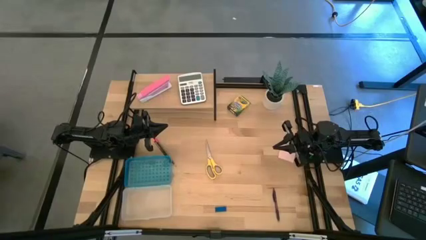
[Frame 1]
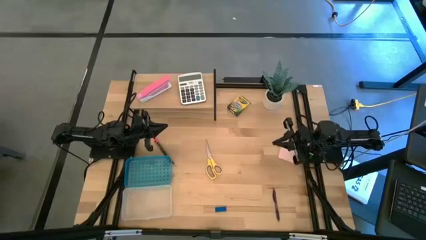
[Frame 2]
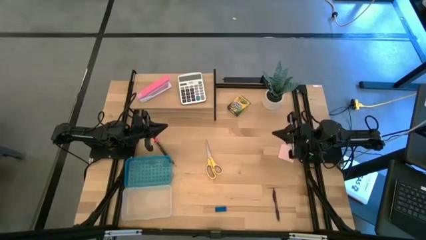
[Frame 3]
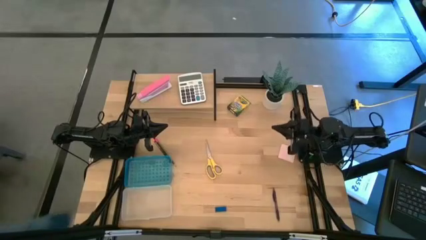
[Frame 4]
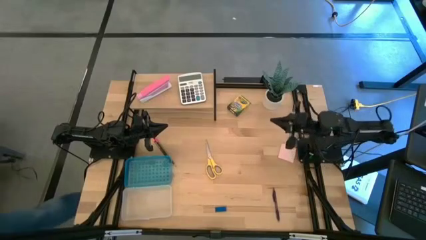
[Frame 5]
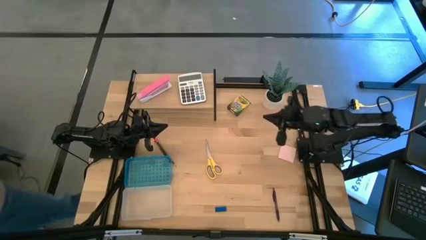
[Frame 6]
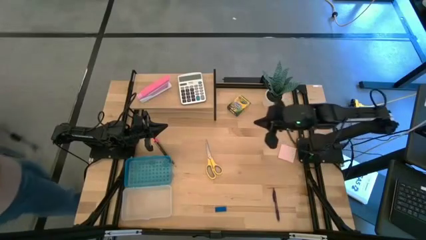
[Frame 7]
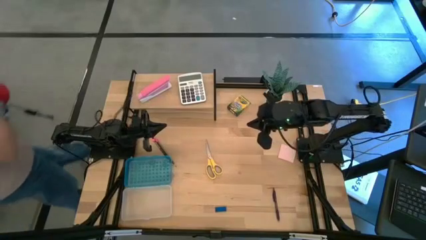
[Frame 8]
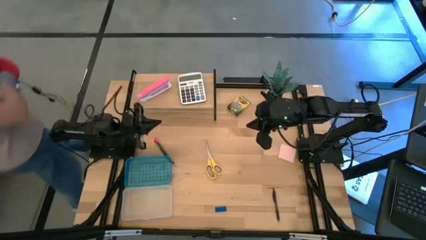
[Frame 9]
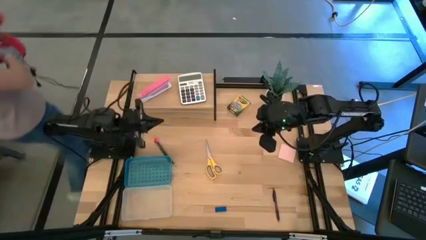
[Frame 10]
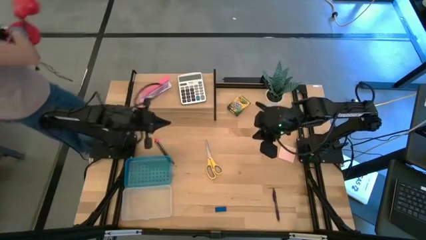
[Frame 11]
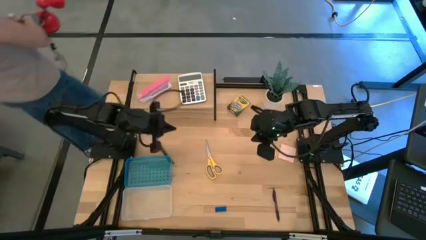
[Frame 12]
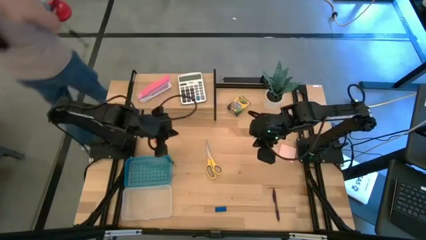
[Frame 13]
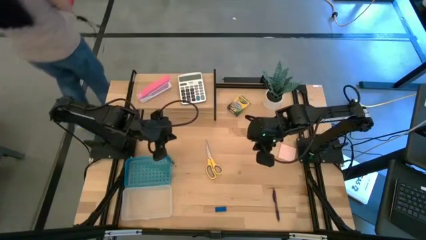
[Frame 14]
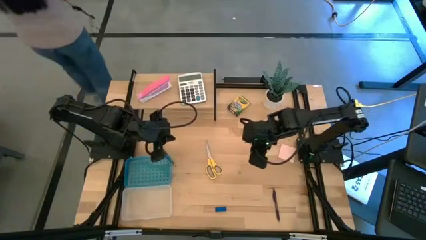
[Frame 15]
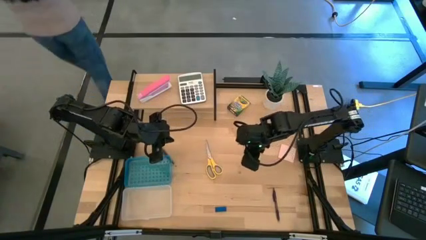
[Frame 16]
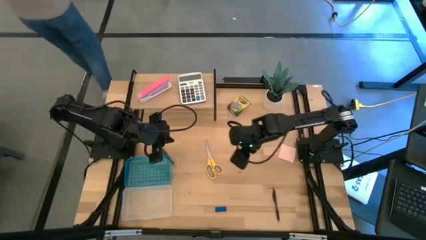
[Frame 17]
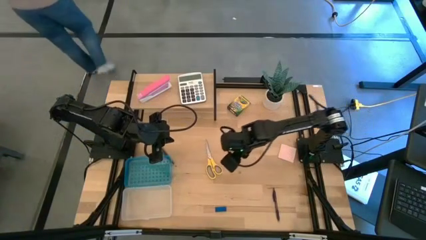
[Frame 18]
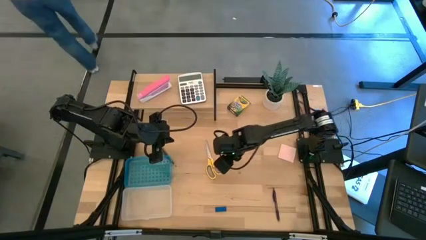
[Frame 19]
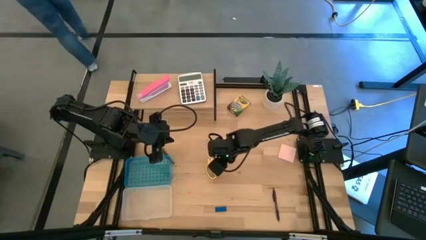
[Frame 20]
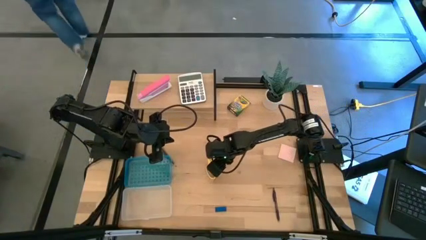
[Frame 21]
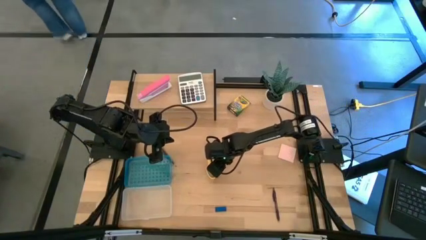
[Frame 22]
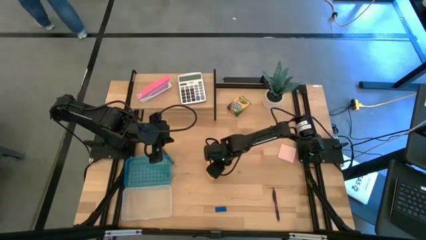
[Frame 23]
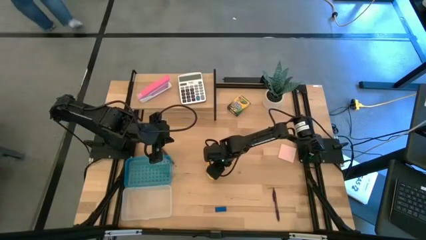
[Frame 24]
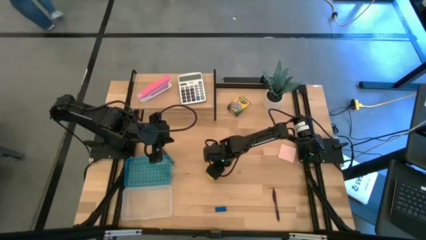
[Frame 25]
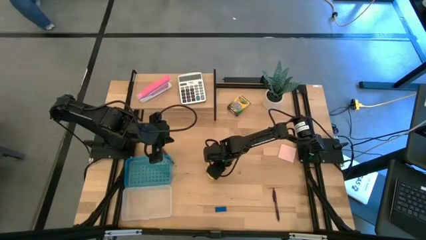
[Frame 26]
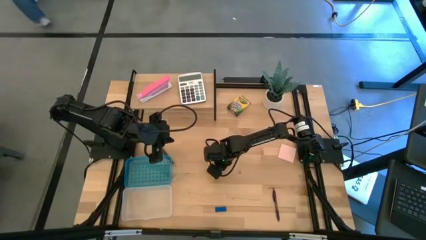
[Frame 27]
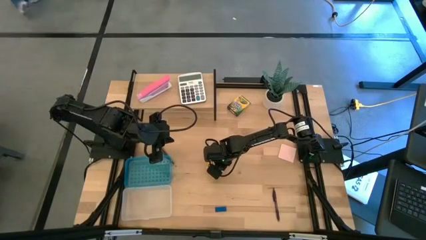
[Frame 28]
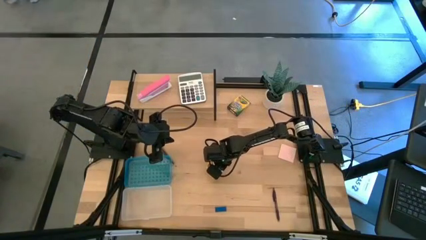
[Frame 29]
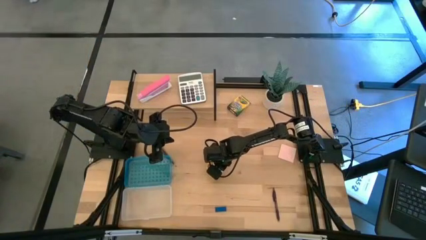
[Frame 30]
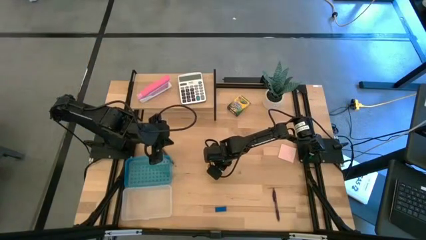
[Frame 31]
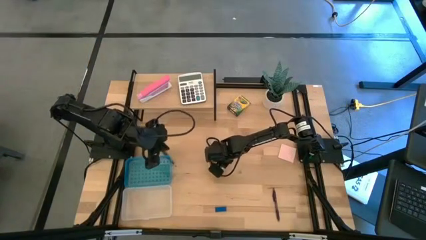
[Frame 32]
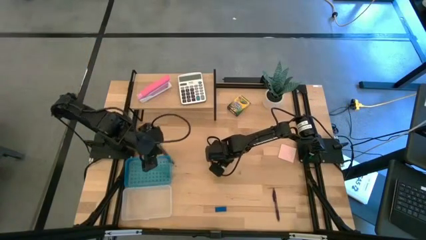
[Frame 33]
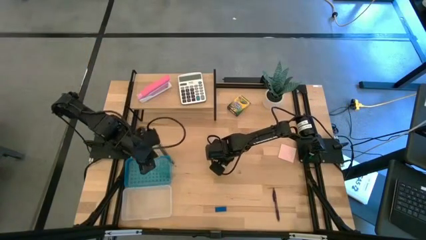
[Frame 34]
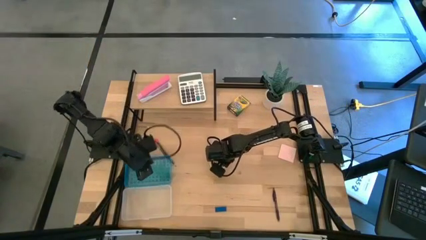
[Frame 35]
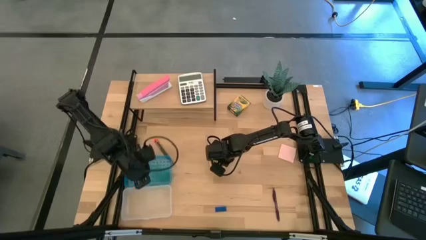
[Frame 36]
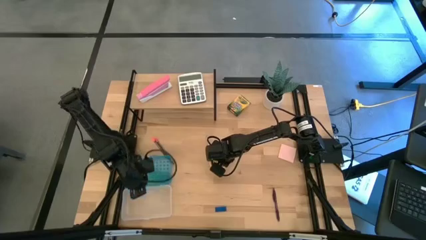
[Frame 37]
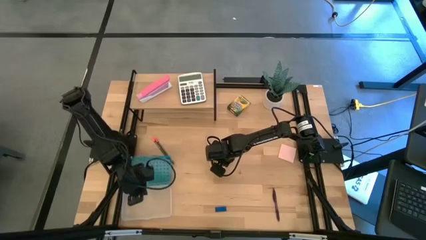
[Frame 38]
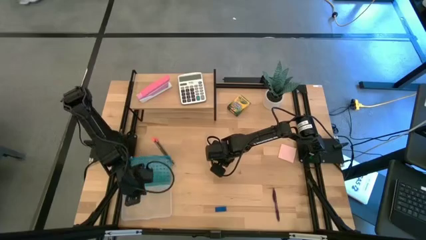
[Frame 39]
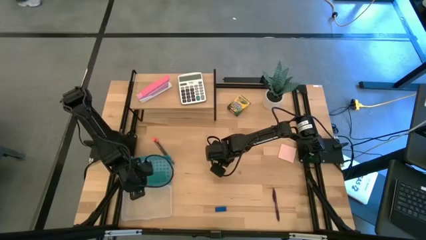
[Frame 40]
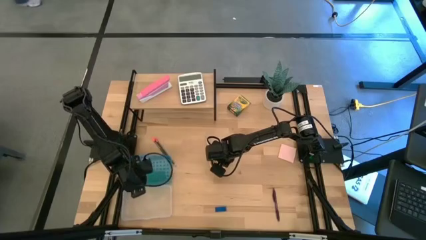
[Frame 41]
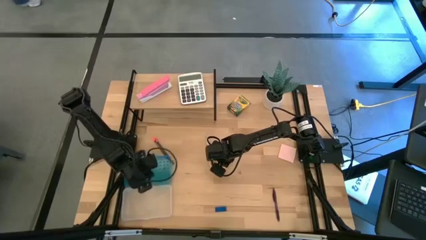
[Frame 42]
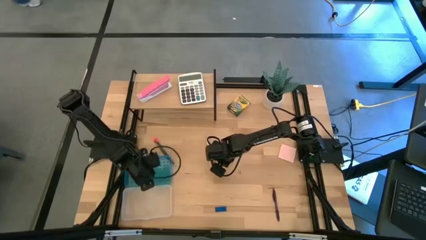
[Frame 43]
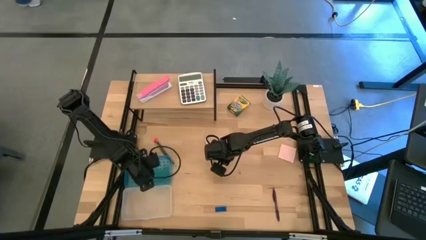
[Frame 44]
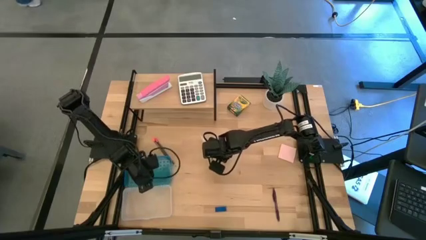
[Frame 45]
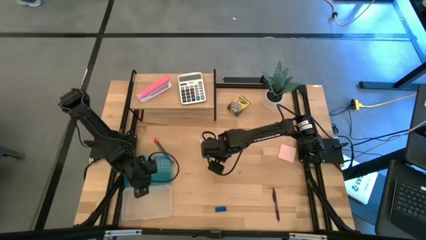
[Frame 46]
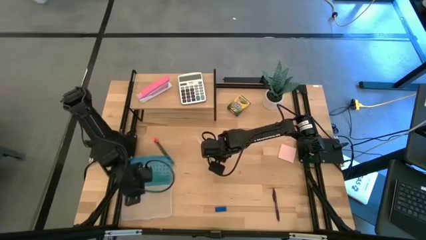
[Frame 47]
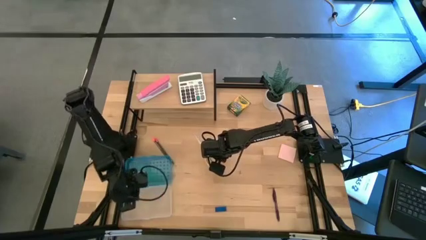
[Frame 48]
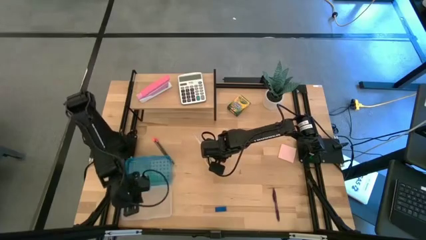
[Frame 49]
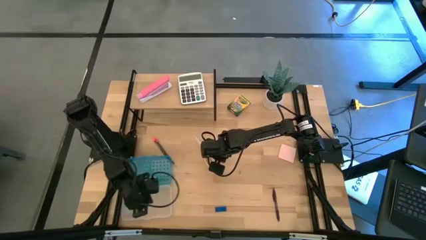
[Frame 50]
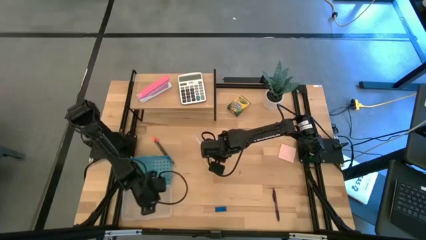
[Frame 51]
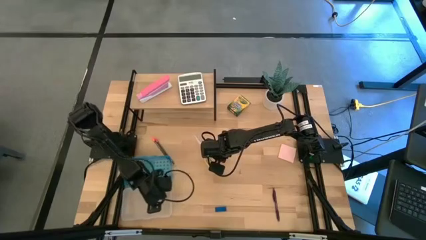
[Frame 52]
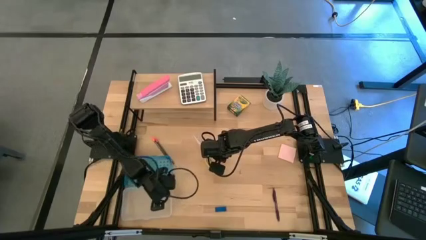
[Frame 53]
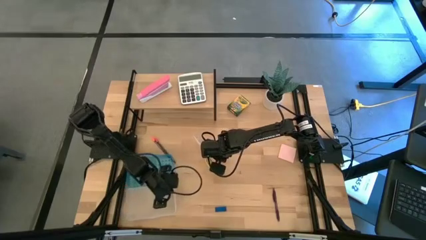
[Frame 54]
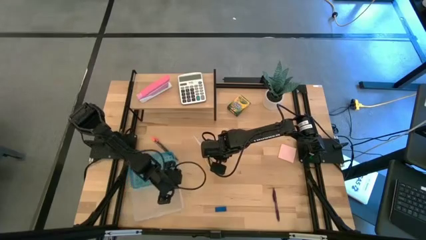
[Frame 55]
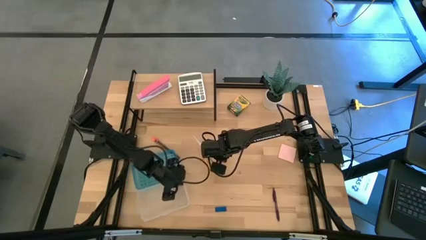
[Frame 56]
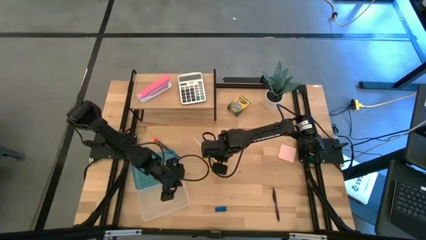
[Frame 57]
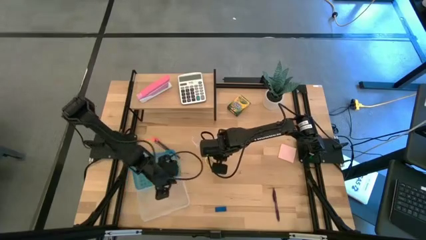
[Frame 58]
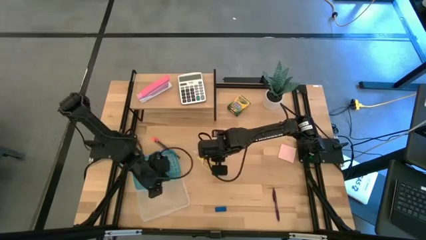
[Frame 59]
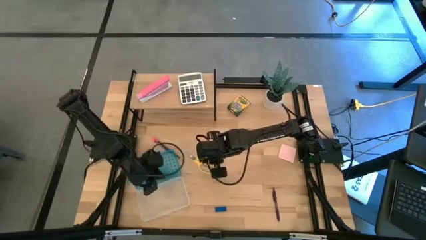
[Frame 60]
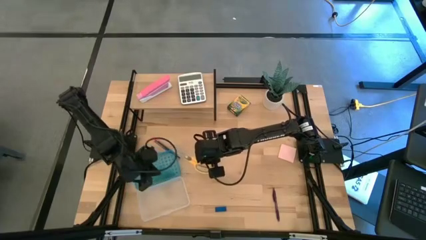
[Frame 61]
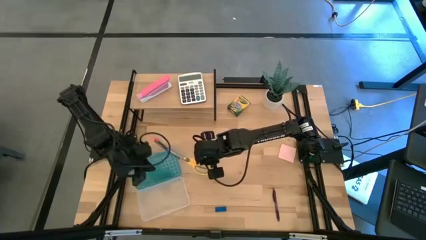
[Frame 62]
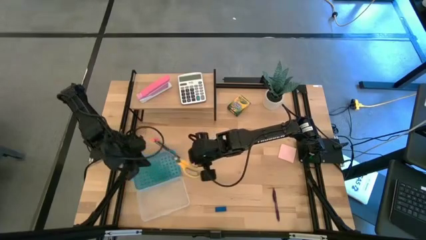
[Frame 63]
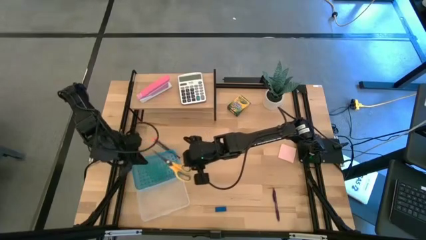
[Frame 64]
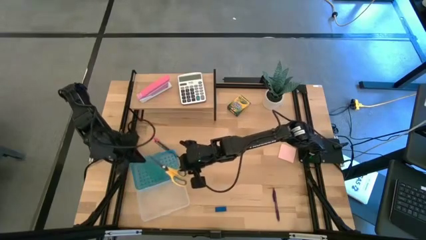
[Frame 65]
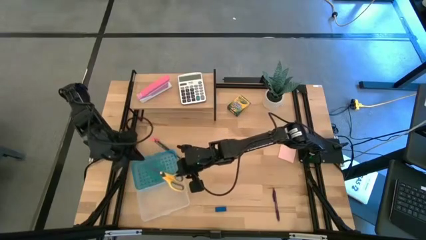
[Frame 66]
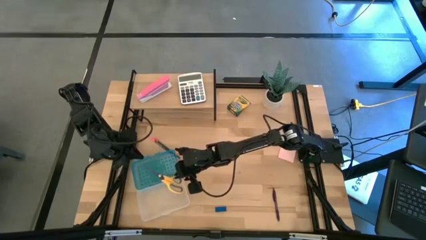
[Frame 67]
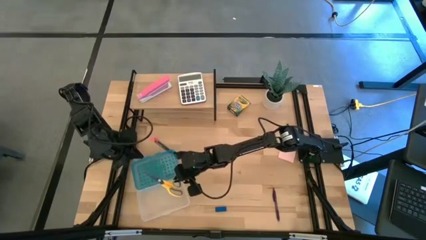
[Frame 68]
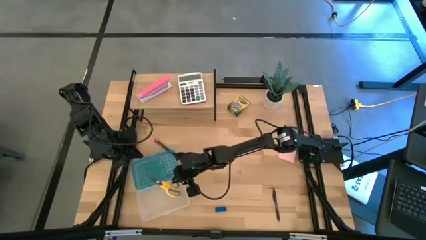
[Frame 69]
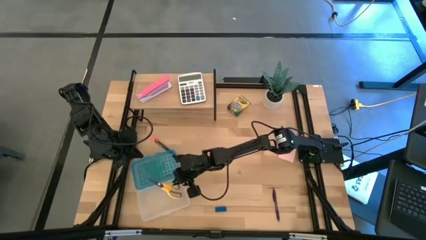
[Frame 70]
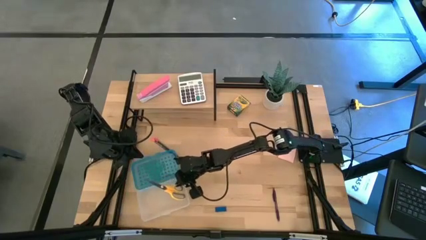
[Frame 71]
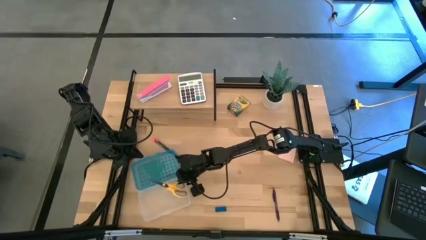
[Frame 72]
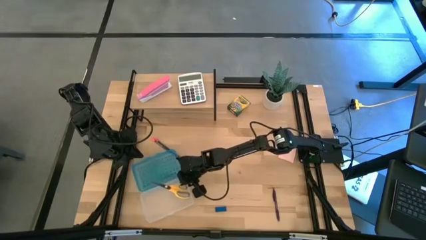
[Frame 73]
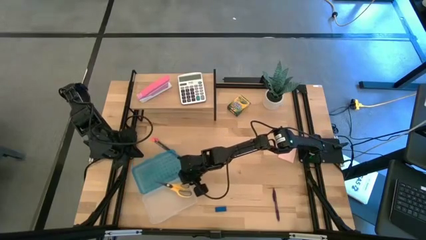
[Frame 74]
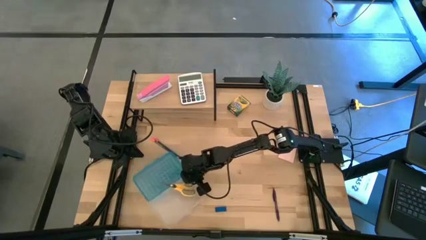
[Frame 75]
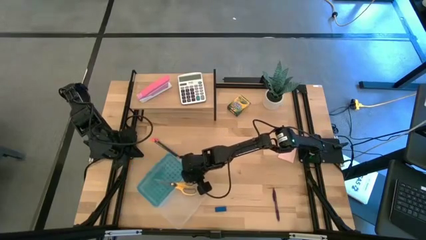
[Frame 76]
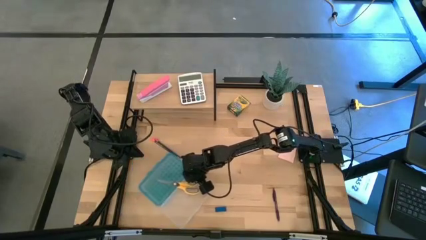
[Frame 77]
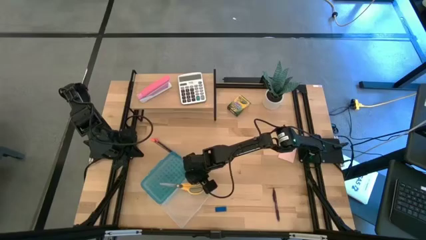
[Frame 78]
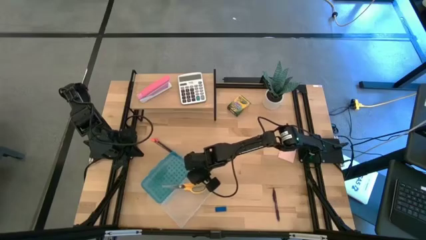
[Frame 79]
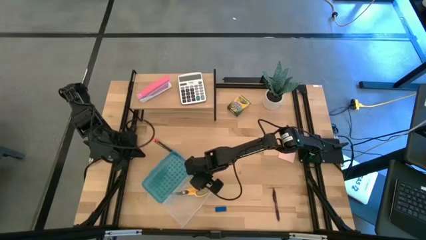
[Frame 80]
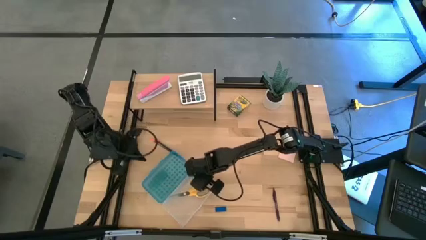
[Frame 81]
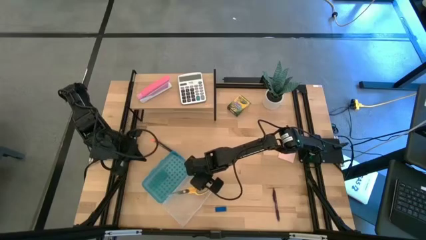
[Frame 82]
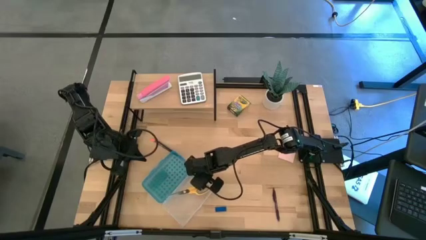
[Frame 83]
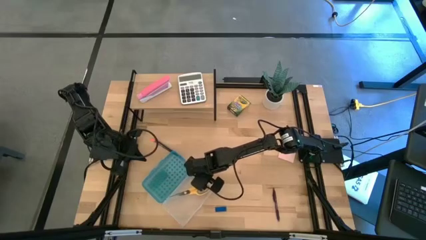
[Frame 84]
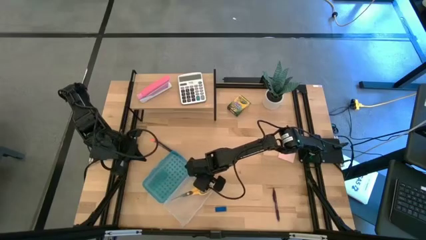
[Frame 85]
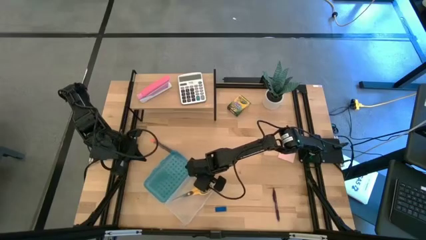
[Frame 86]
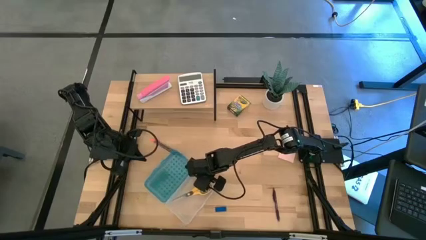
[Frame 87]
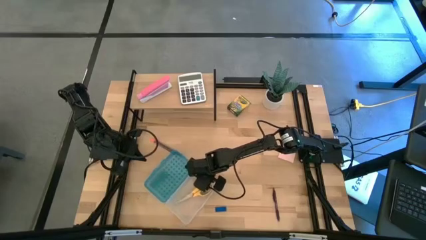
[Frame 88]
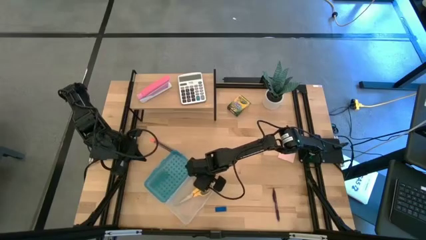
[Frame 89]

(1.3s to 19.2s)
Task: Pack school essentials
Put the yellow scissors into the blue supply box
